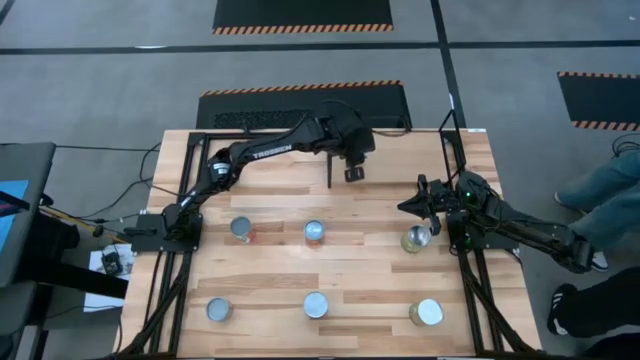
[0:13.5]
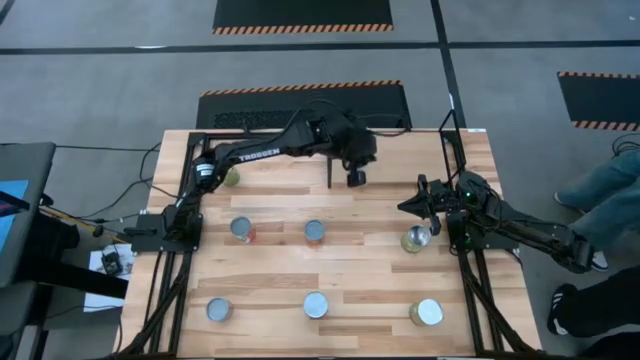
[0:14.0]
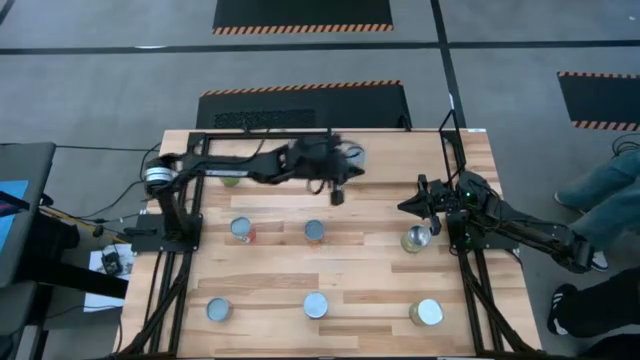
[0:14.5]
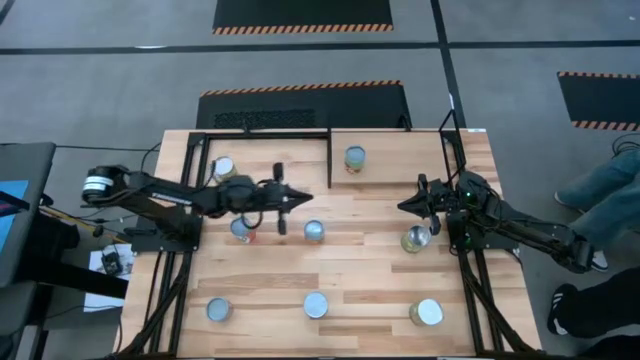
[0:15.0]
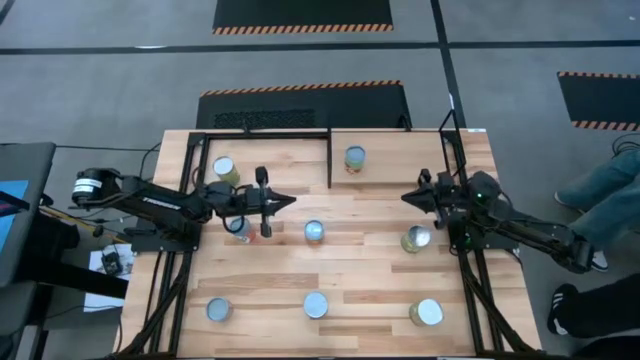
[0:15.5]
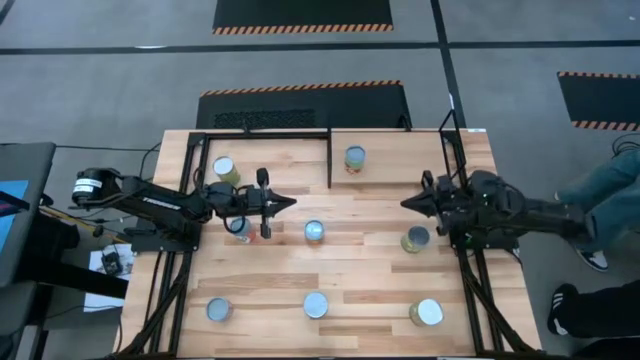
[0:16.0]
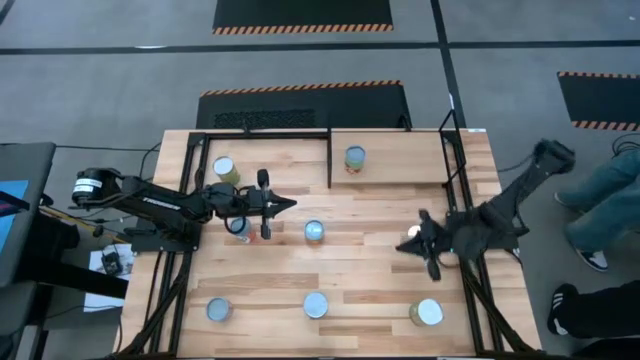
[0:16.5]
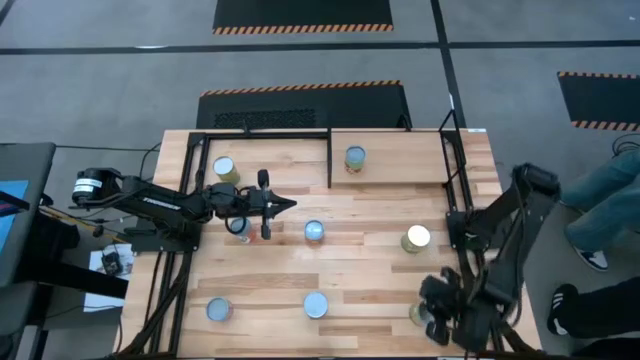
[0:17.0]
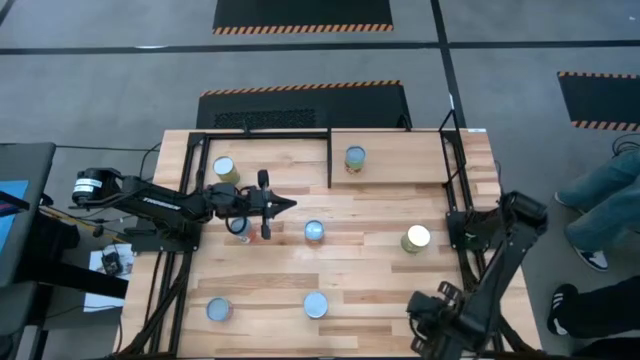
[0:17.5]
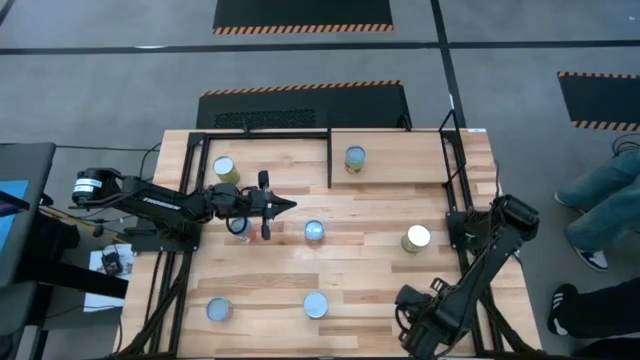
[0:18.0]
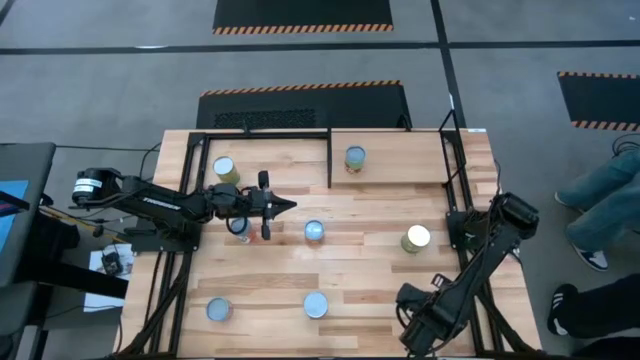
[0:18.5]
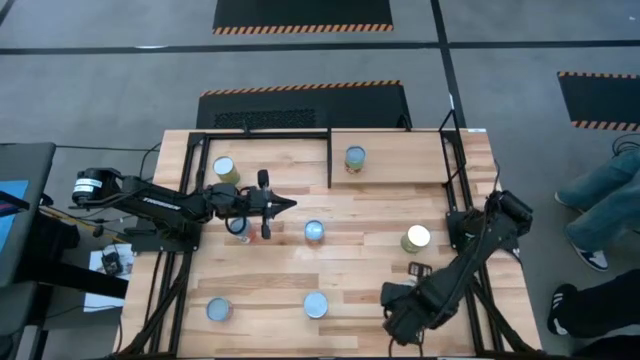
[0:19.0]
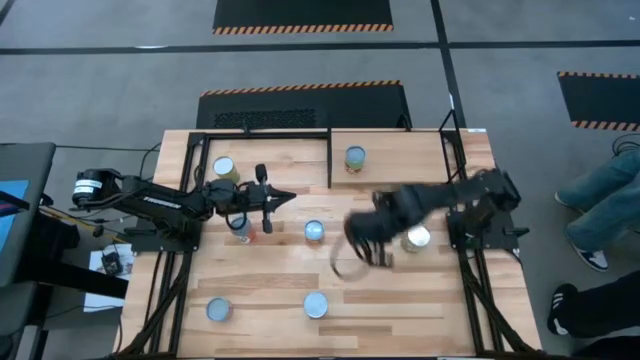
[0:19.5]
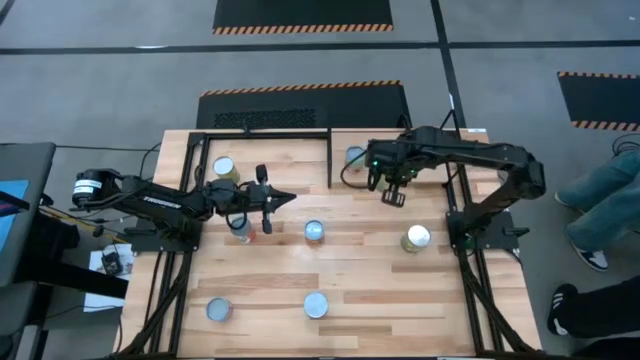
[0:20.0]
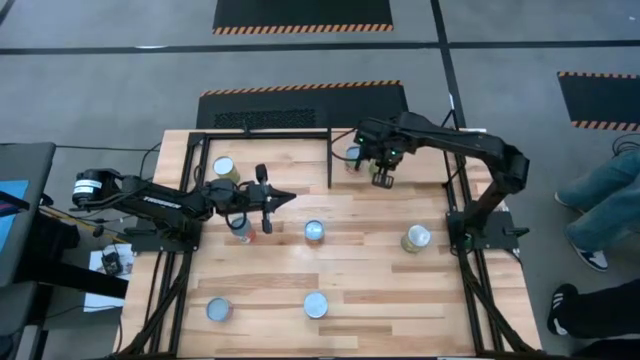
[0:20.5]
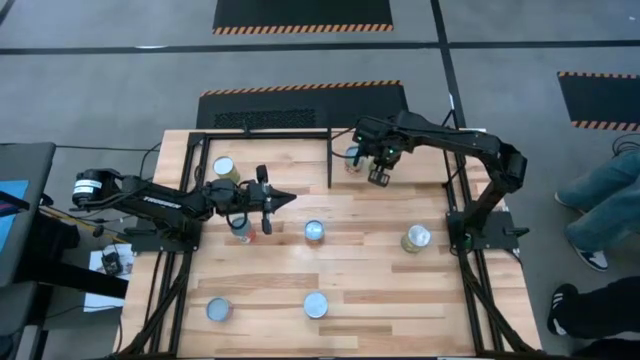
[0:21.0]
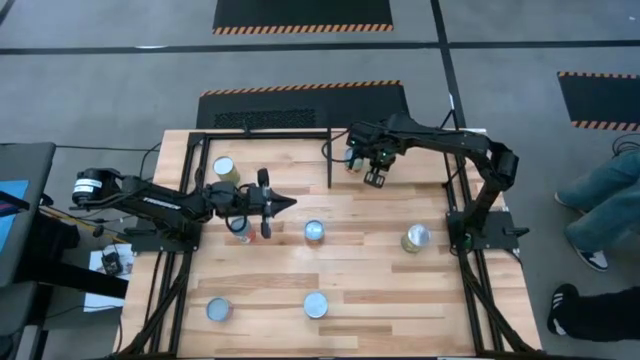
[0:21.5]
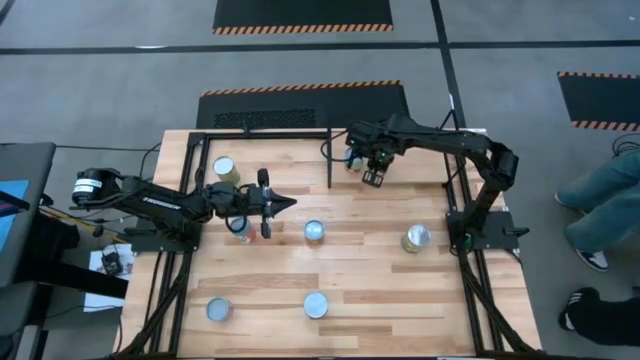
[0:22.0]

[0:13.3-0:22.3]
Task: Pick and place cans onto a shelf
Put the large right canned oranges on the shelf

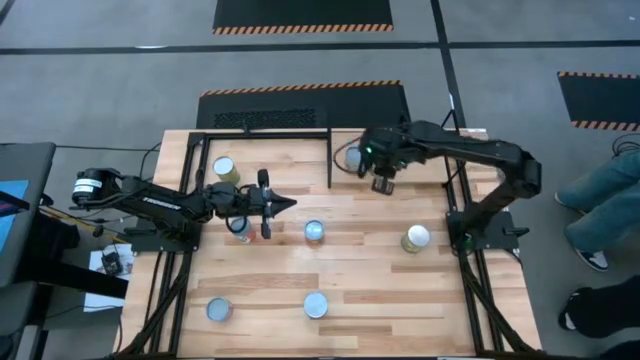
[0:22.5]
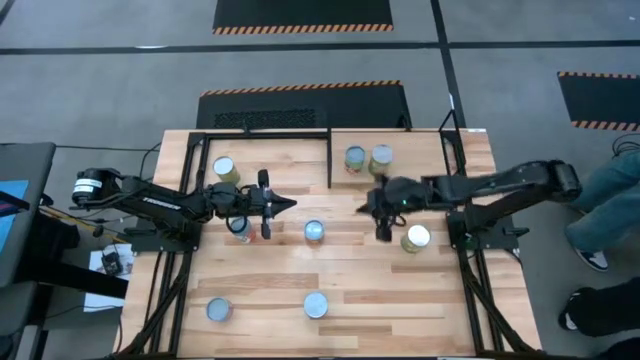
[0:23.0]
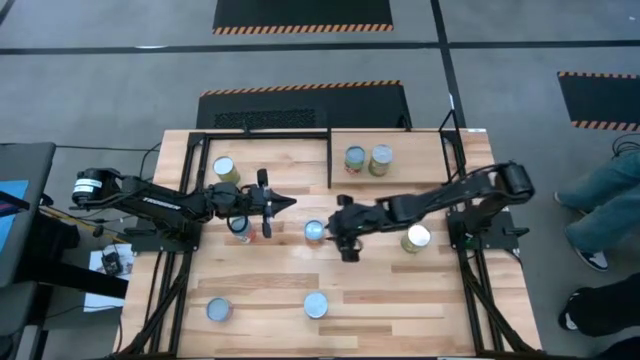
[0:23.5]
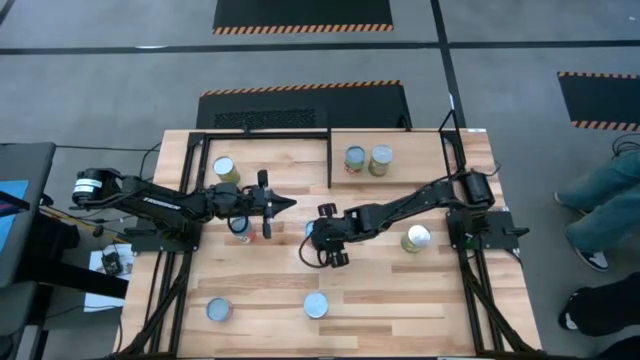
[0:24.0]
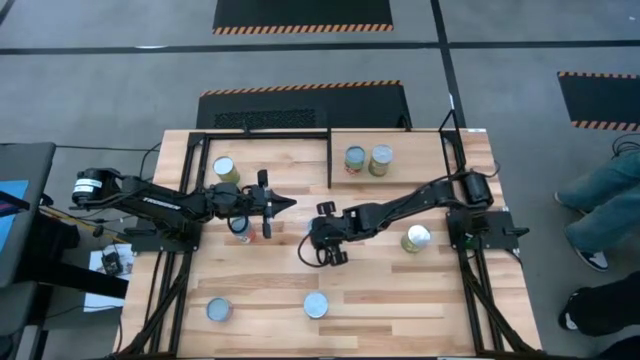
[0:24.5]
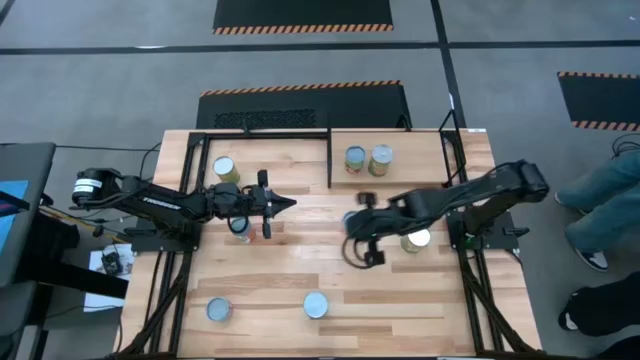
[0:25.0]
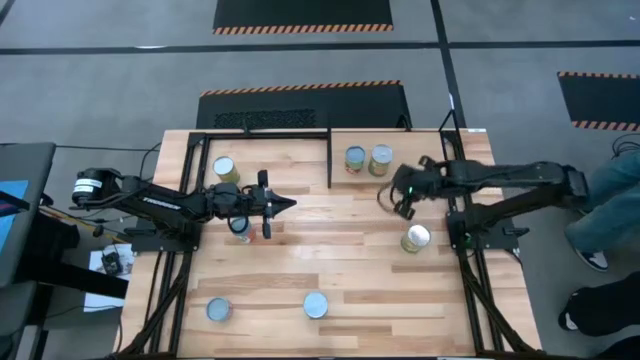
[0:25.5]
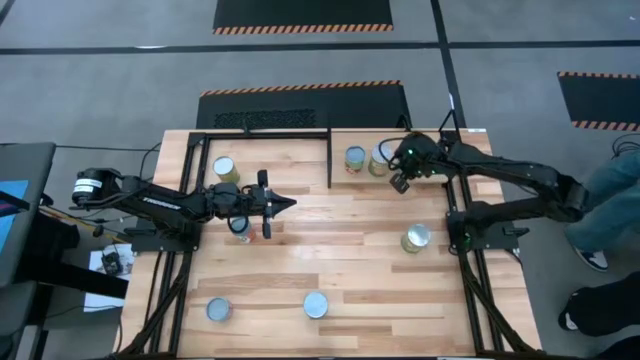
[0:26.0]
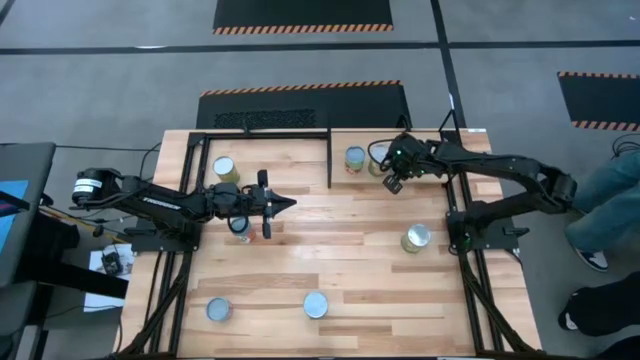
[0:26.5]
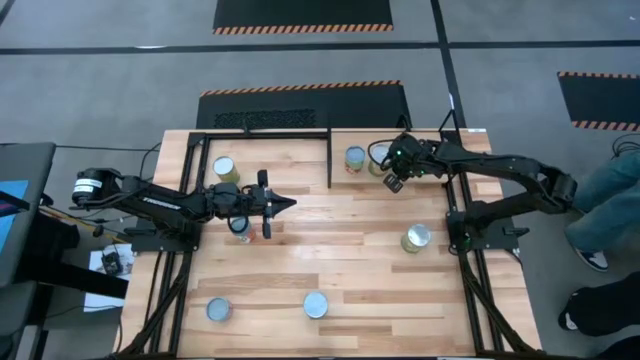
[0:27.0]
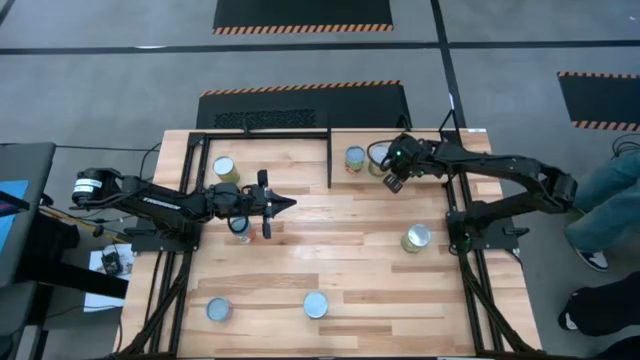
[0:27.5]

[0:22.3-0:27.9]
Put the small canned oranges on the shelf

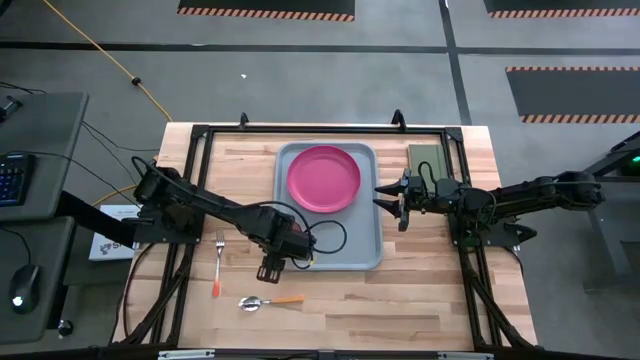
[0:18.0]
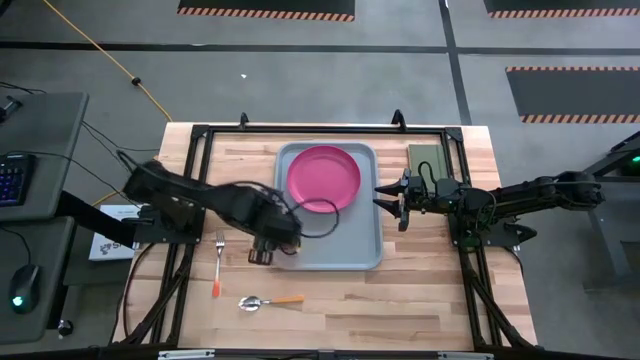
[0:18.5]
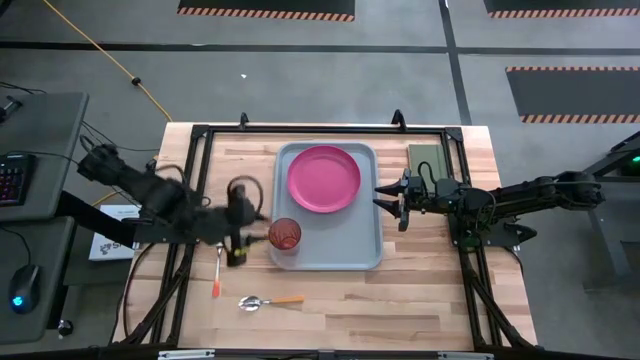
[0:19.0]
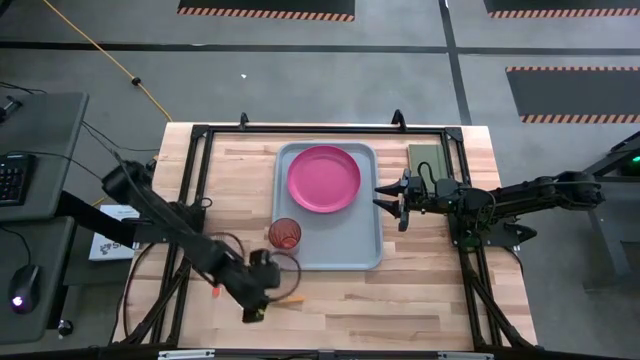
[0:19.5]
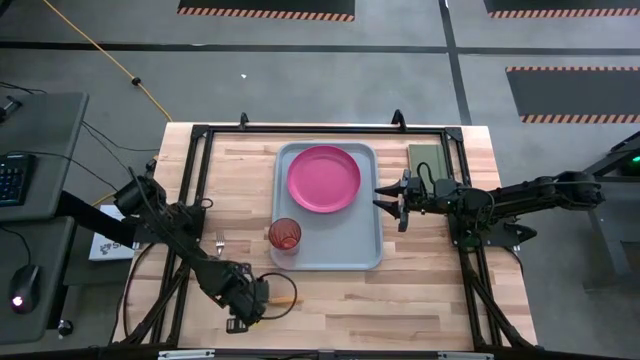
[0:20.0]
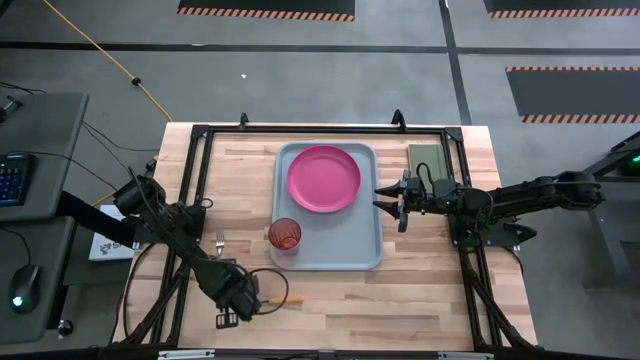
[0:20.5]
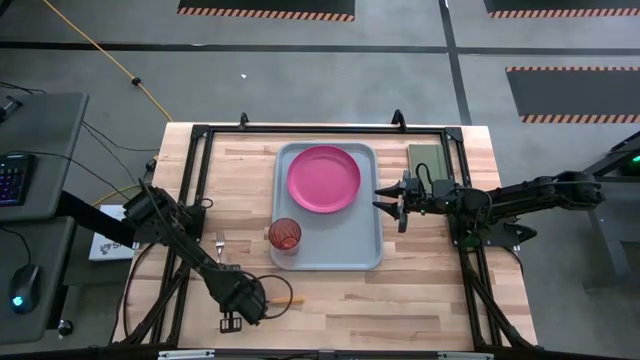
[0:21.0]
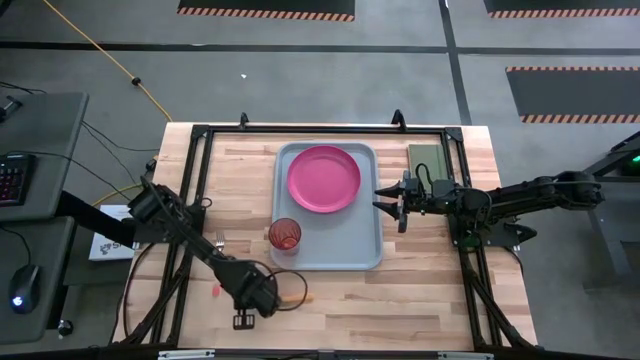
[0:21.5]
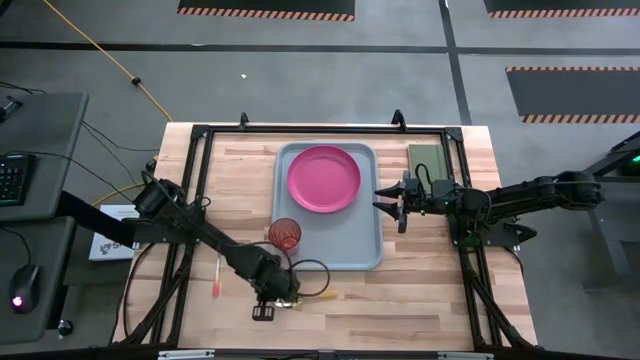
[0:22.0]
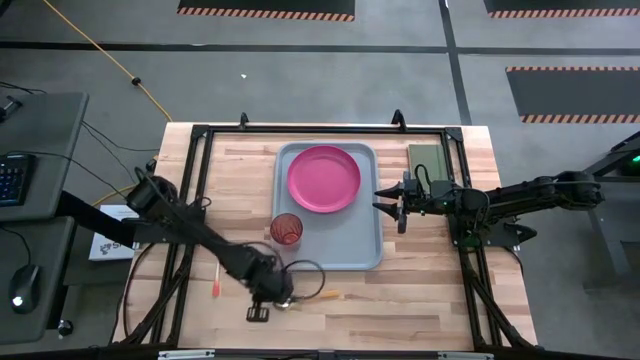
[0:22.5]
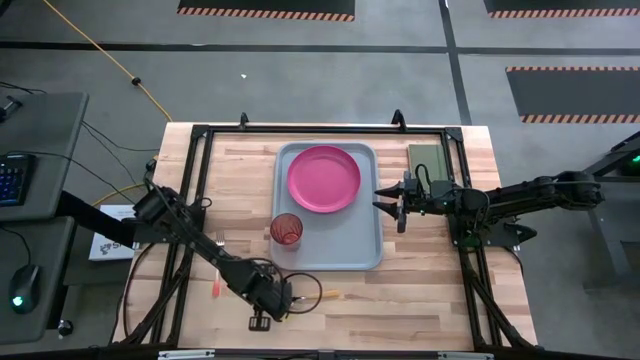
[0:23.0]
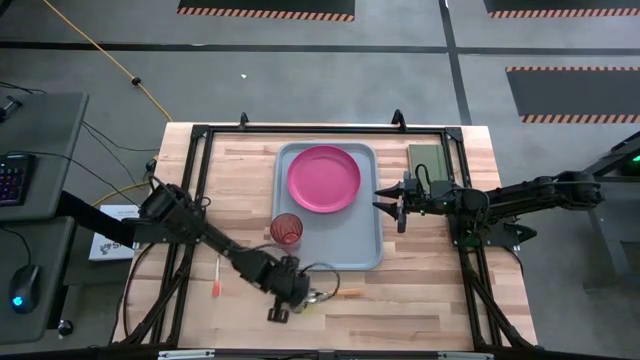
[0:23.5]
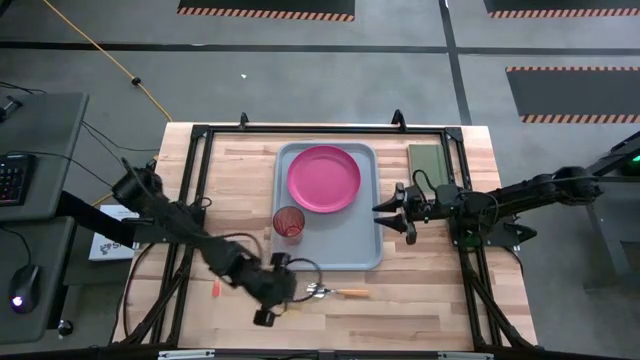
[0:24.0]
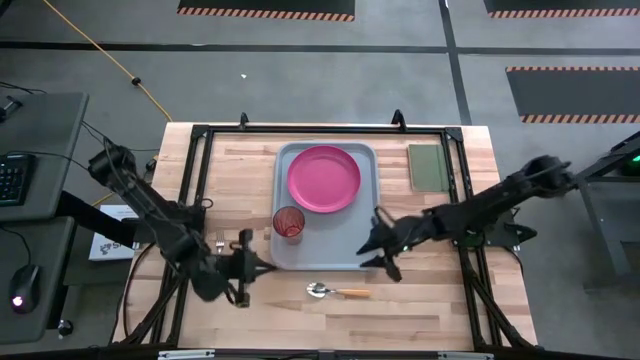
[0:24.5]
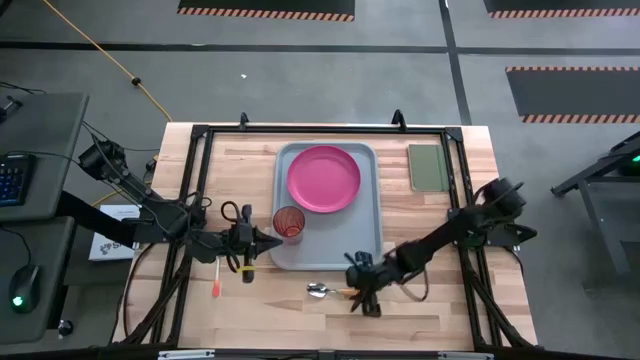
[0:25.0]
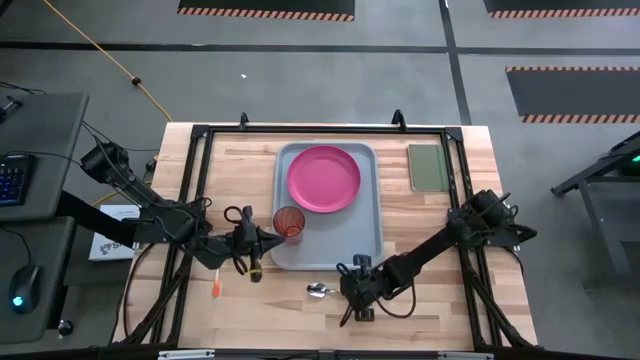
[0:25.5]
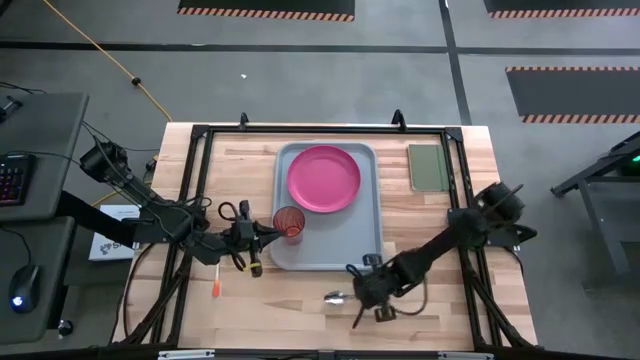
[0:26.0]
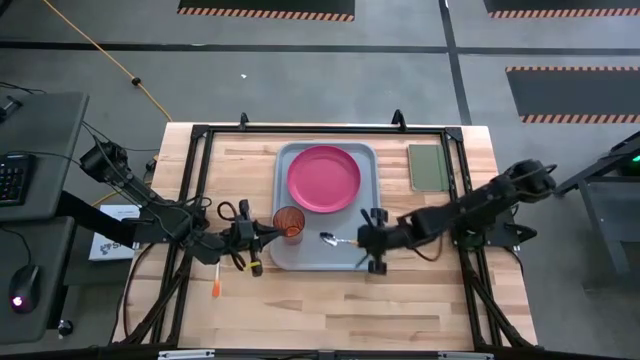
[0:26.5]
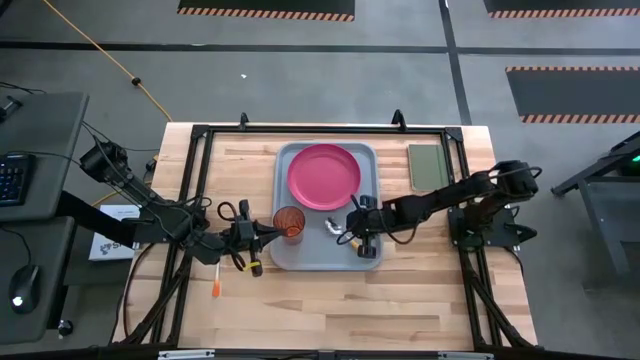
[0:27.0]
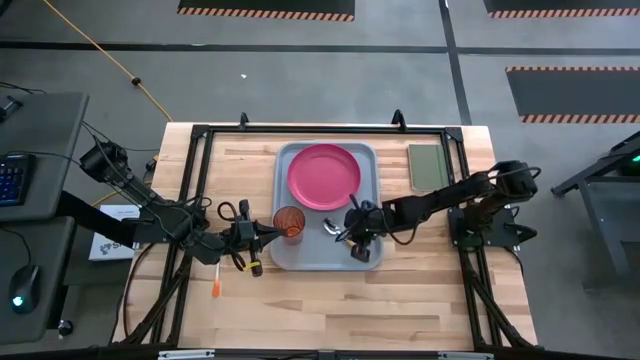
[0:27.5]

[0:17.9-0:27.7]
Task: Pick and place plate/cup/fork/spoon on tray
Put the yellow spoon on the gray serving tray to the right of the orange cup
